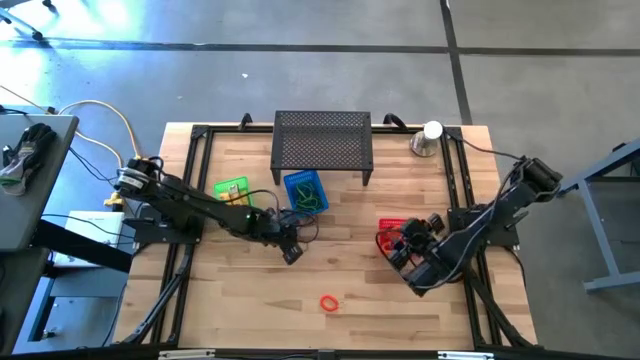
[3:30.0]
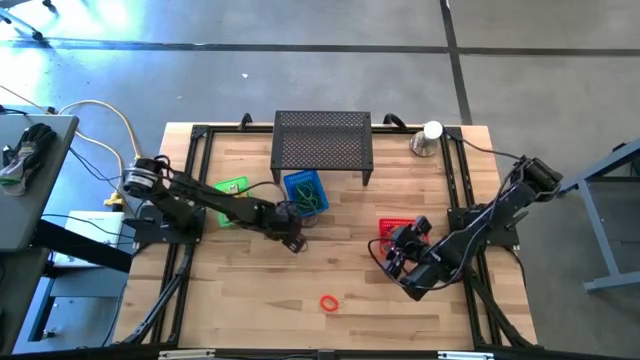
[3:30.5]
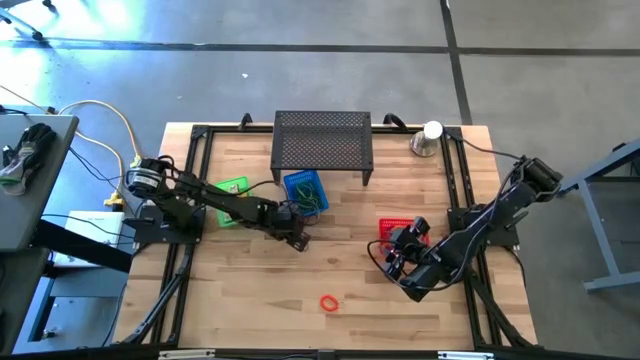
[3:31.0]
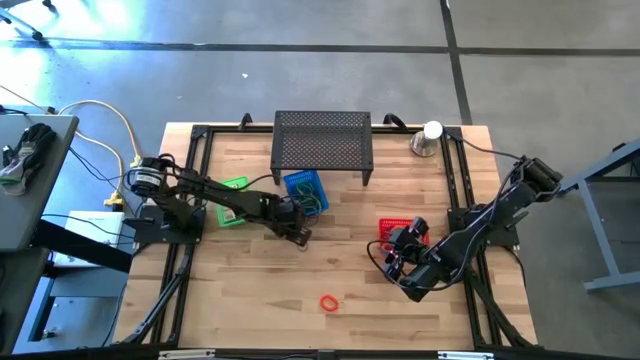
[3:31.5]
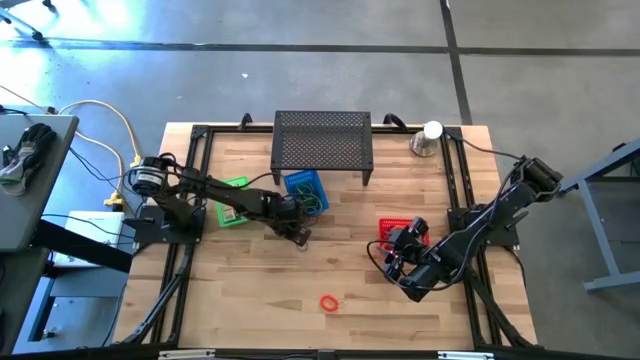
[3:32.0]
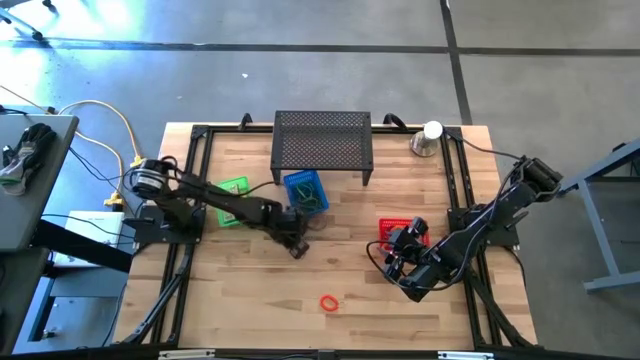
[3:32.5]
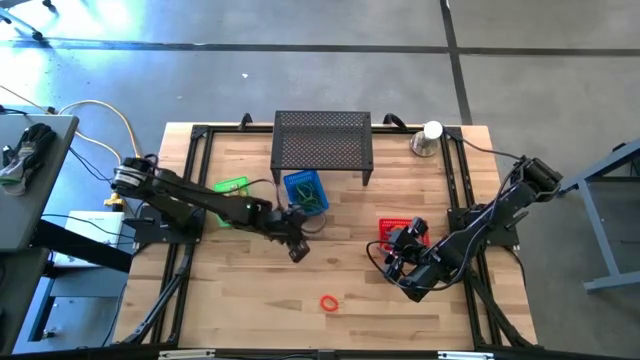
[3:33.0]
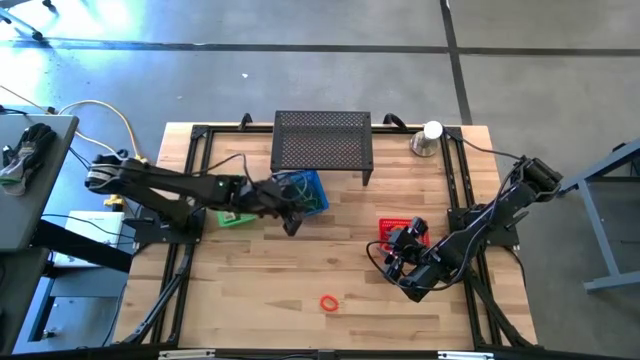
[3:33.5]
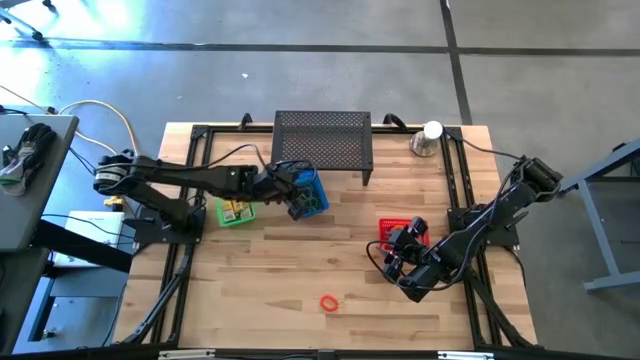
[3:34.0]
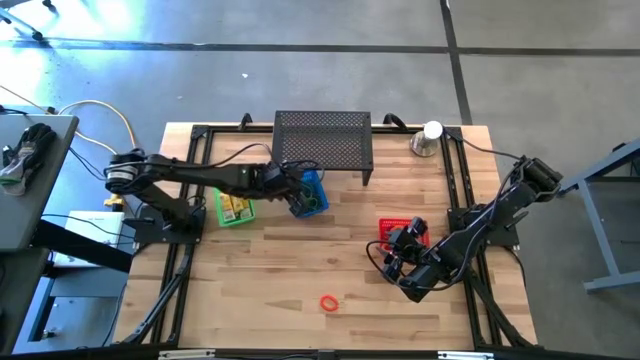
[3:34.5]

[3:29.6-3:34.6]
Task: Pick & Place Office Desk Supplies
Put the violet rubber band into the blue basket

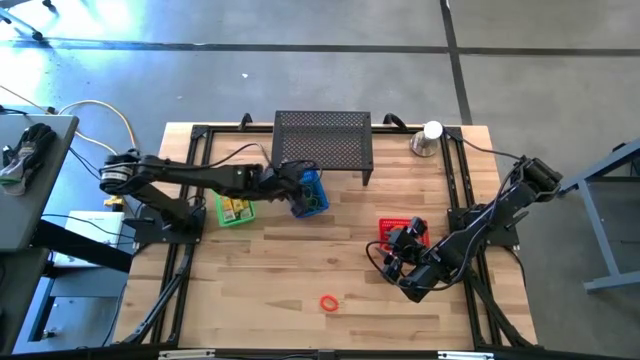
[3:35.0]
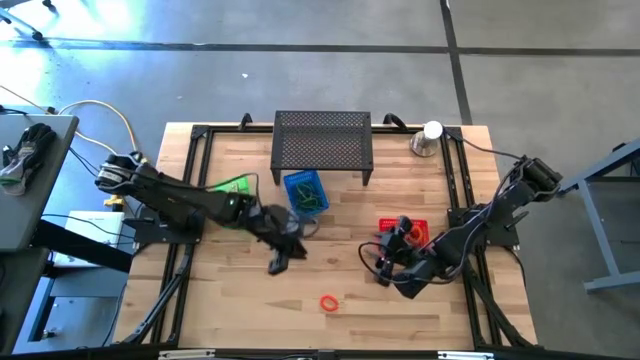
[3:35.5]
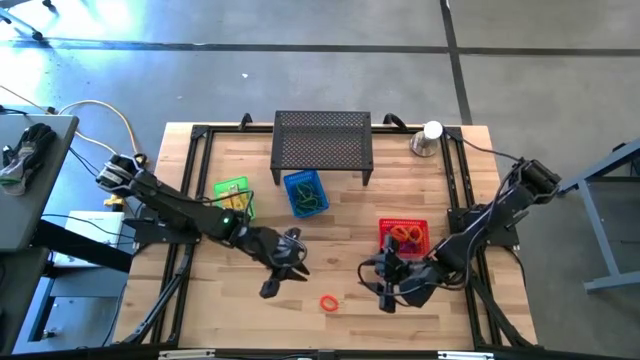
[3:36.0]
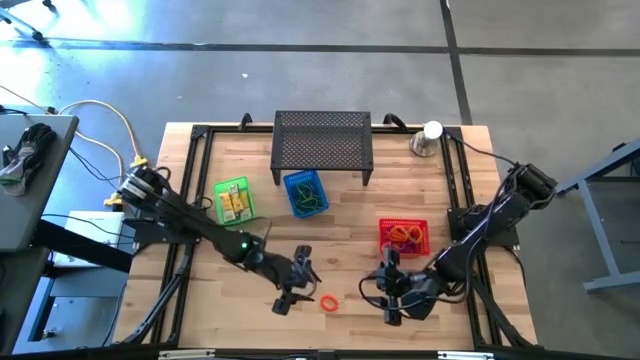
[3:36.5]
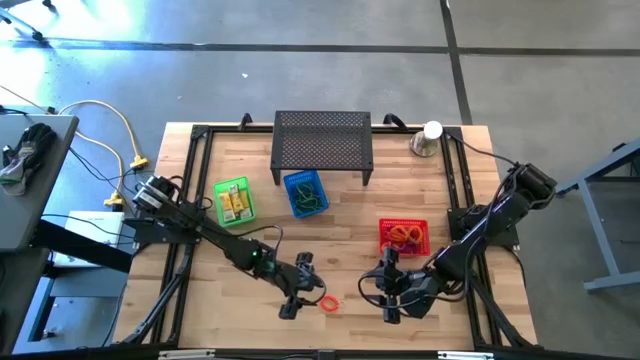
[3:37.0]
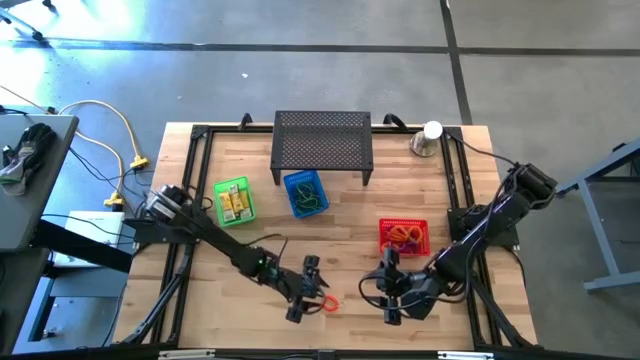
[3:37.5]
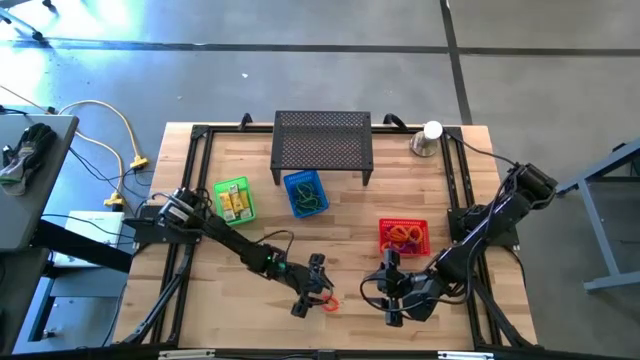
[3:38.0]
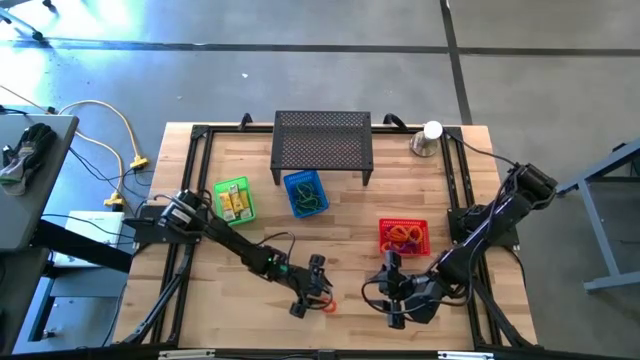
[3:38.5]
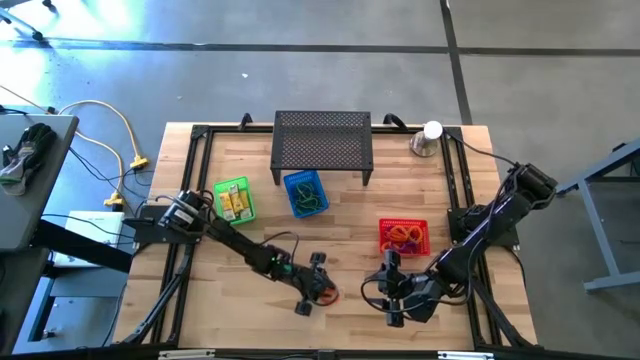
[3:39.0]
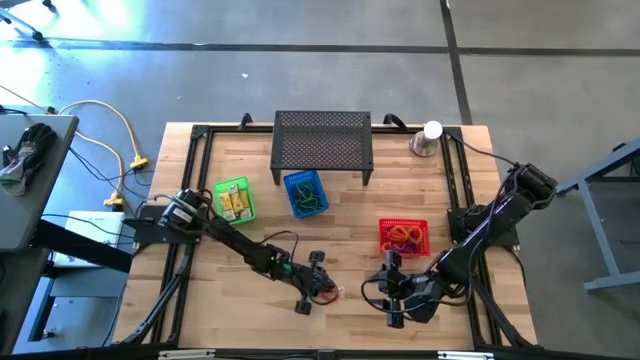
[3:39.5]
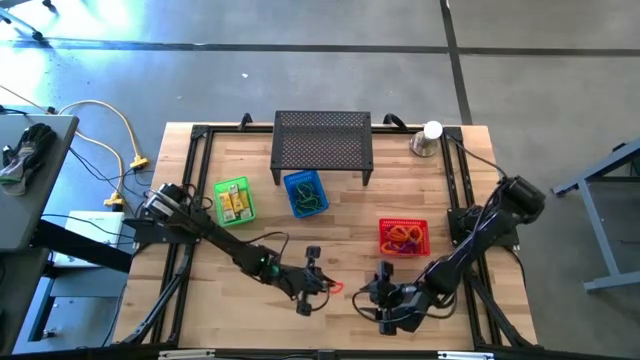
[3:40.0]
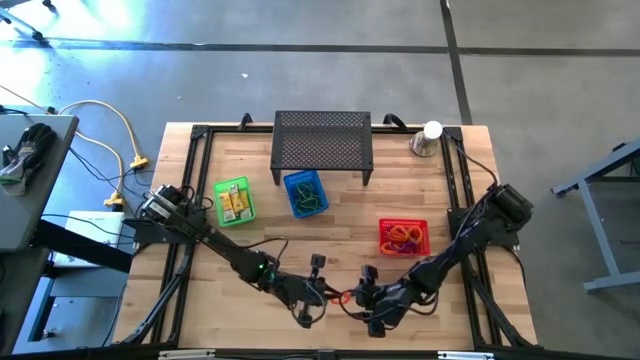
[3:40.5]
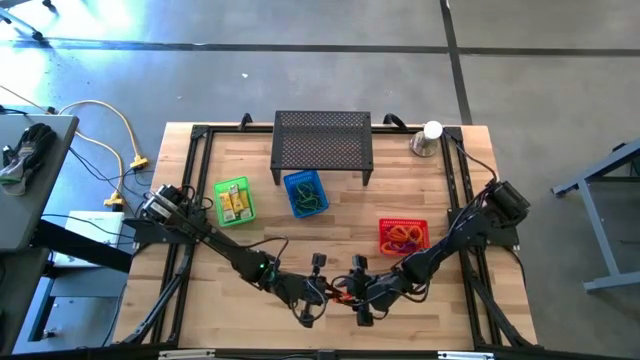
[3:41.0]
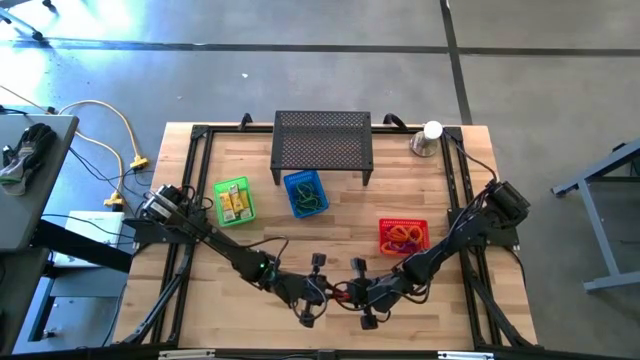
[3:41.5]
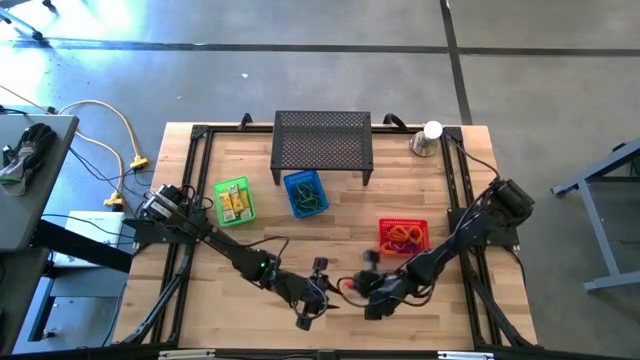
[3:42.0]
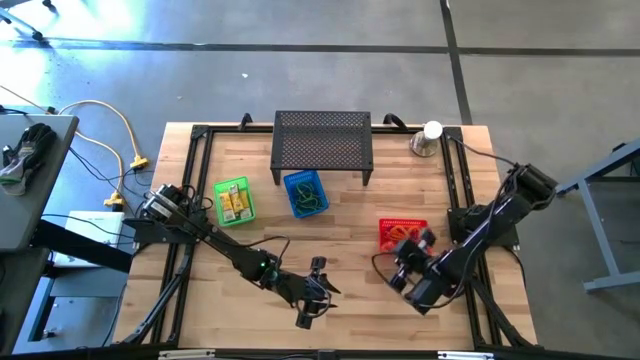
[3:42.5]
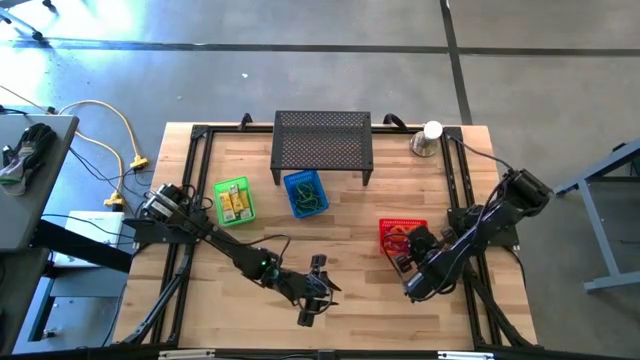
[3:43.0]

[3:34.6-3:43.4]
Put the red spring keychain into the red basket

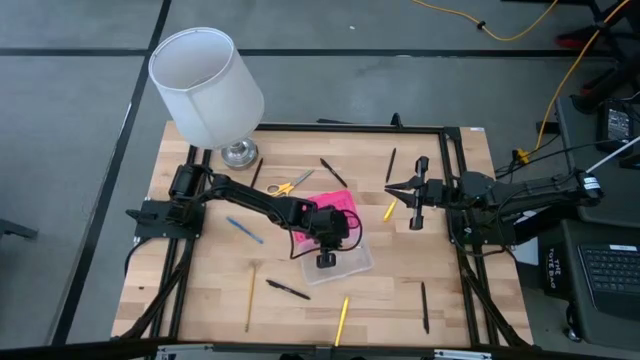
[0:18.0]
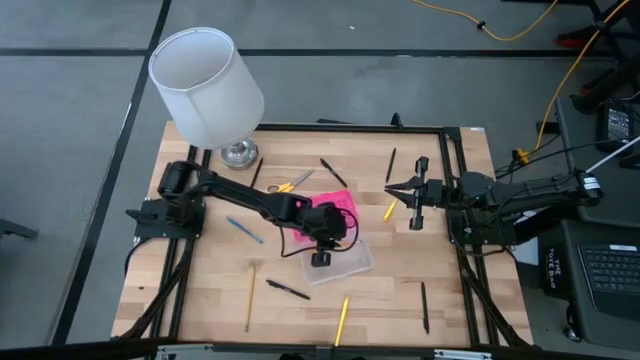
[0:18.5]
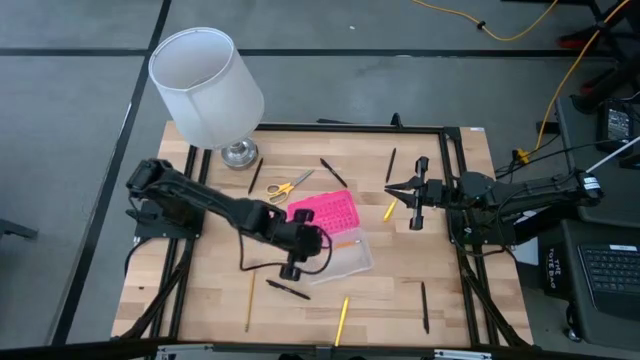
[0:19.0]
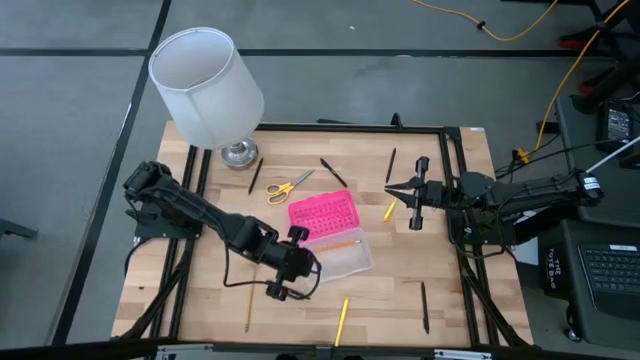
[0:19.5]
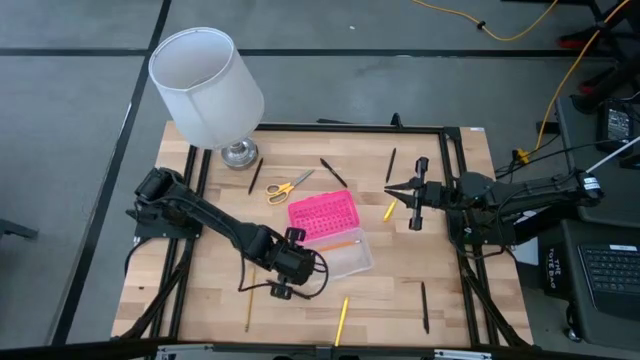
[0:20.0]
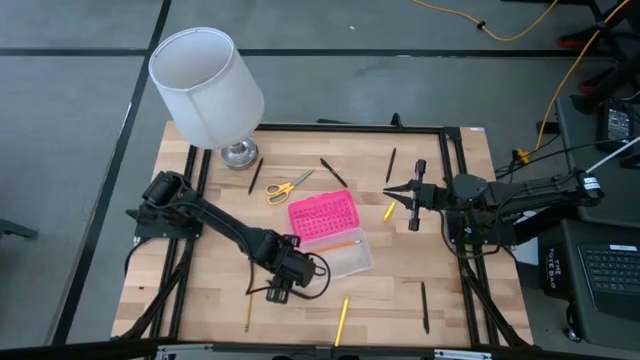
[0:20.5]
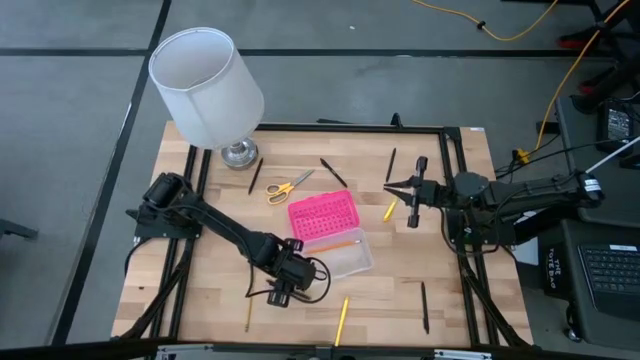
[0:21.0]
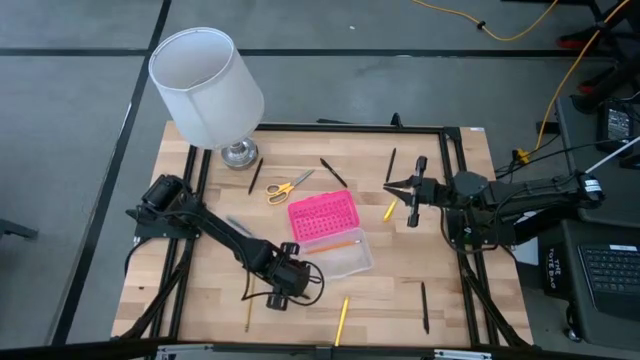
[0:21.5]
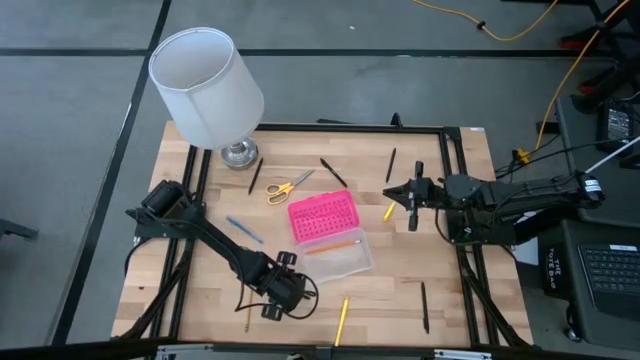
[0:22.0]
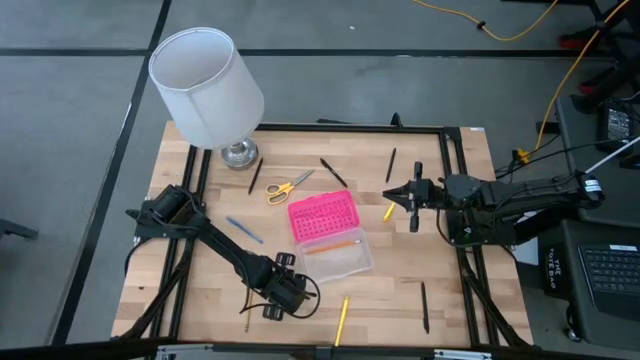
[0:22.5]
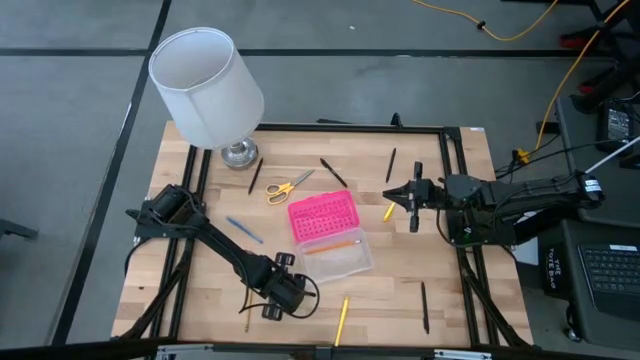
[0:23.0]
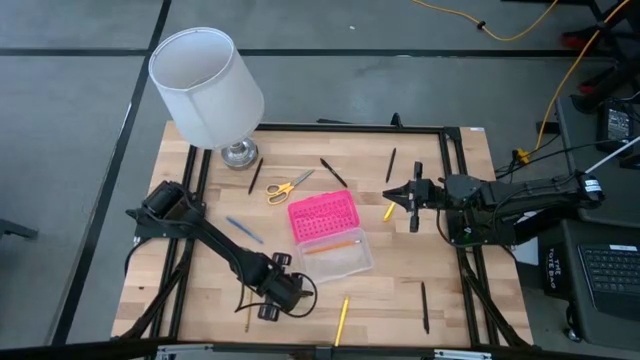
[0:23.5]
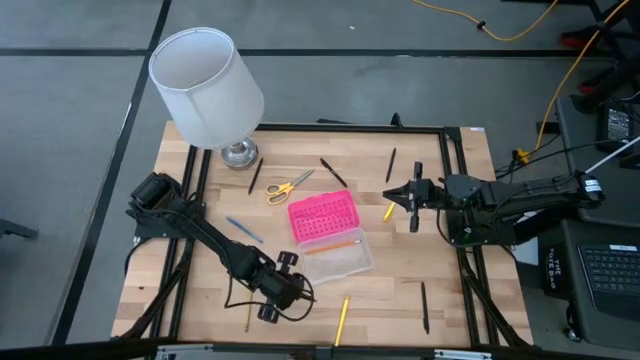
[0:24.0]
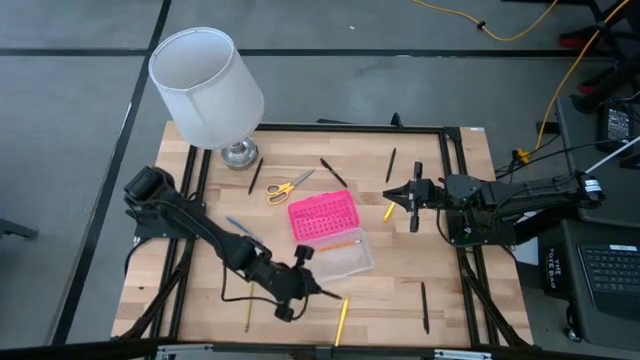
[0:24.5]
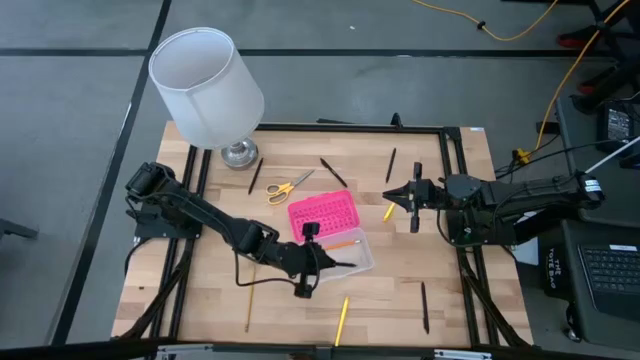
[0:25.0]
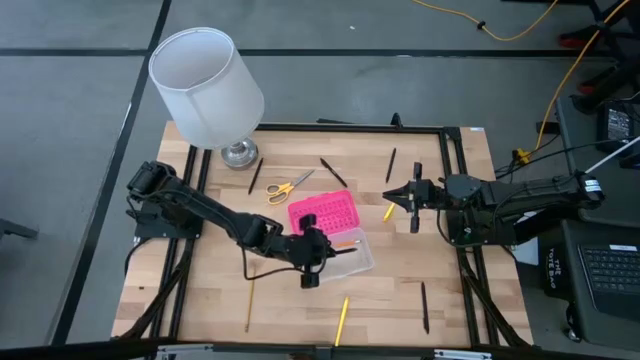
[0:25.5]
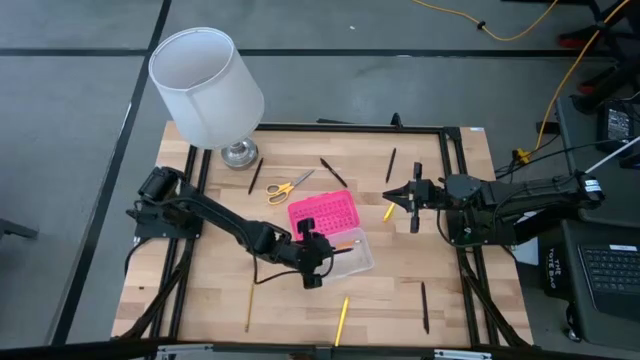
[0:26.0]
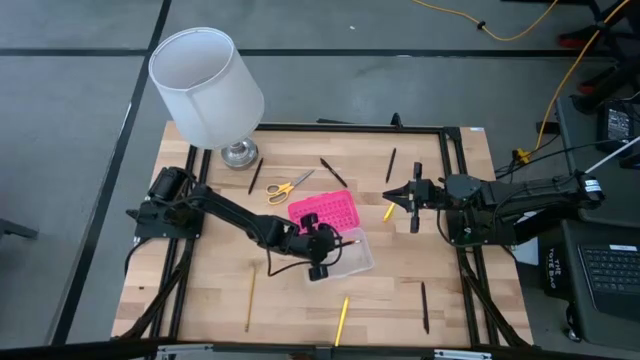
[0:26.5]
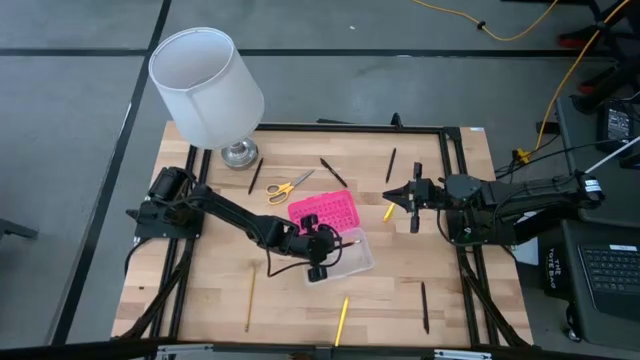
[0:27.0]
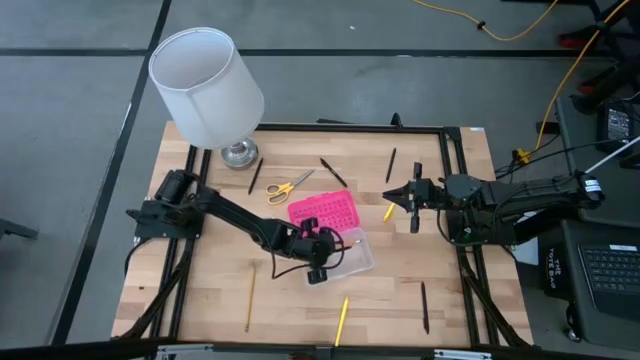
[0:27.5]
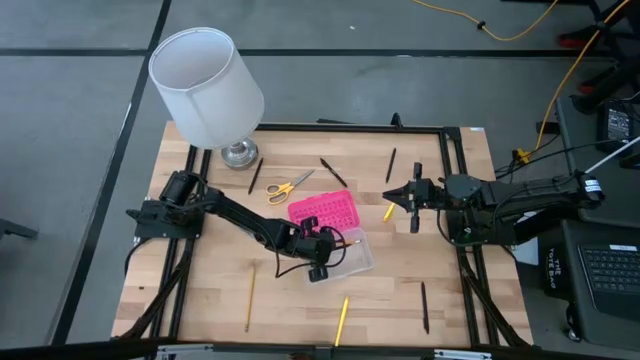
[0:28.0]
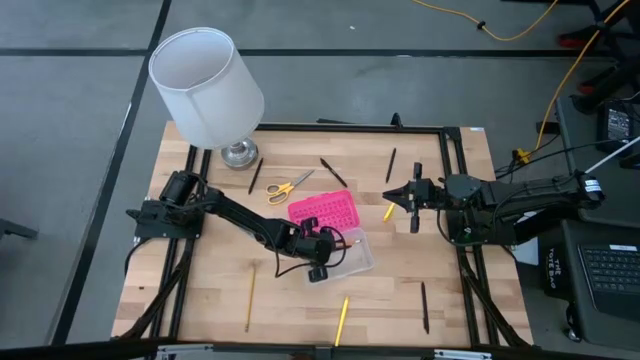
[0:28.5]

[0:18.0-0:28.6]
Task: Pick & place school supplies into a supply box
Put the black pen into the pink supply box
